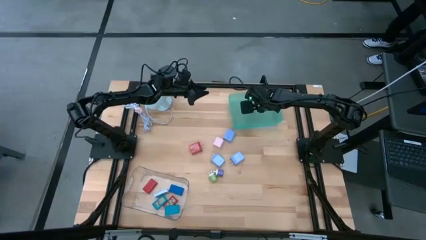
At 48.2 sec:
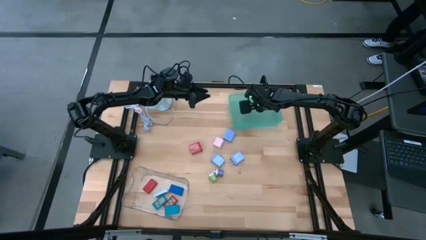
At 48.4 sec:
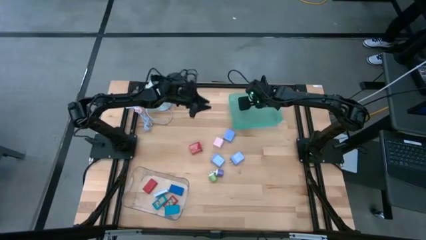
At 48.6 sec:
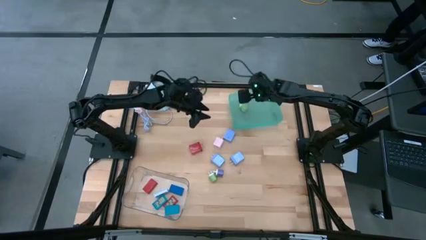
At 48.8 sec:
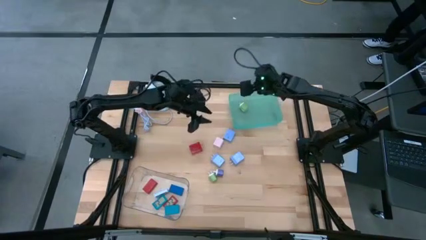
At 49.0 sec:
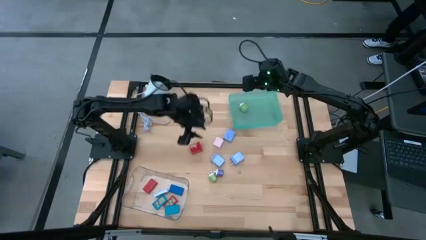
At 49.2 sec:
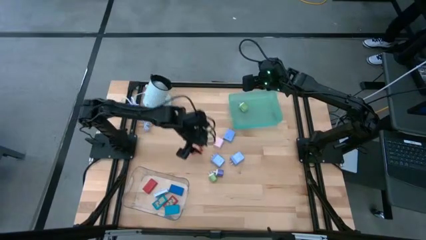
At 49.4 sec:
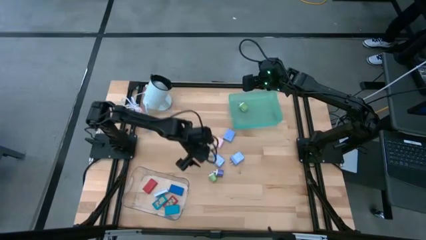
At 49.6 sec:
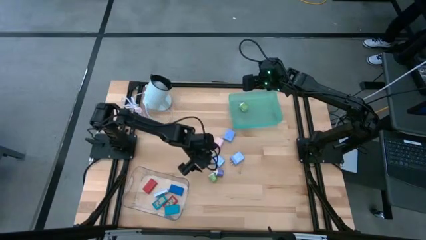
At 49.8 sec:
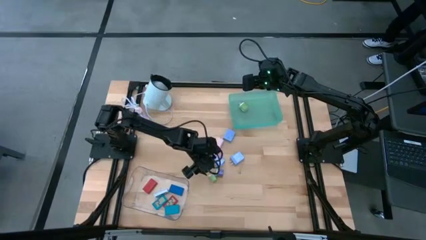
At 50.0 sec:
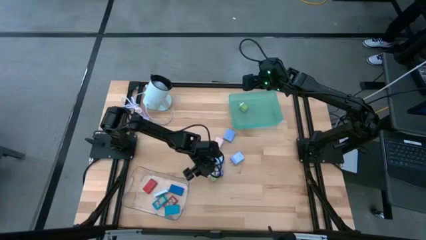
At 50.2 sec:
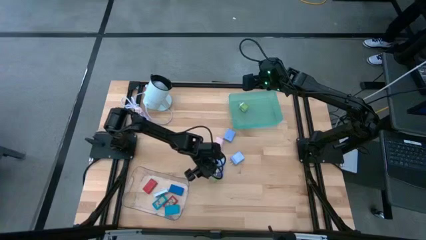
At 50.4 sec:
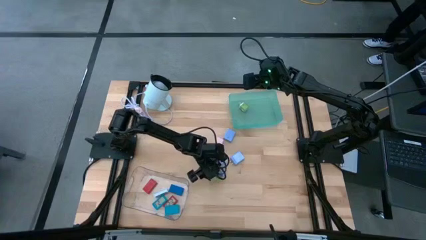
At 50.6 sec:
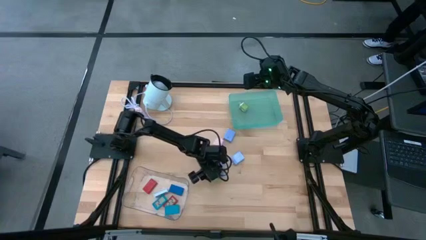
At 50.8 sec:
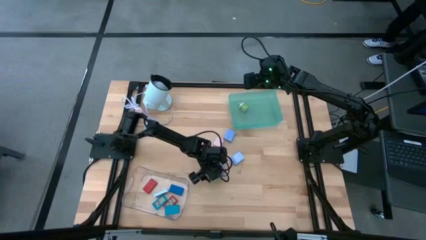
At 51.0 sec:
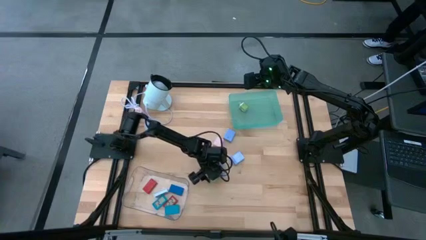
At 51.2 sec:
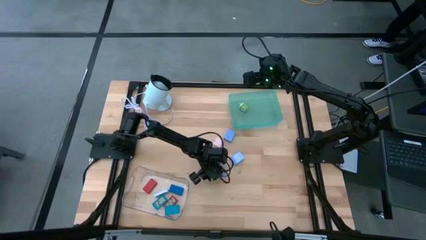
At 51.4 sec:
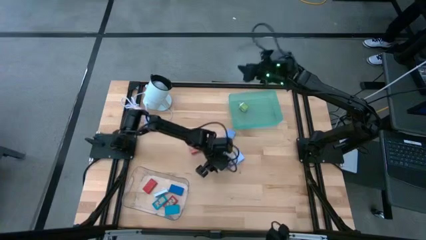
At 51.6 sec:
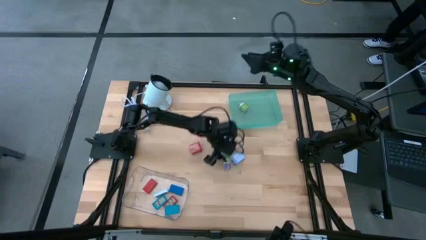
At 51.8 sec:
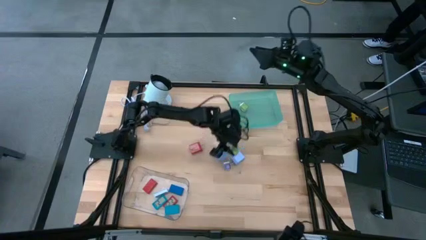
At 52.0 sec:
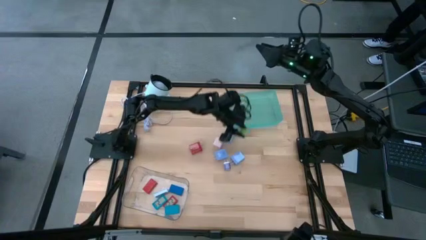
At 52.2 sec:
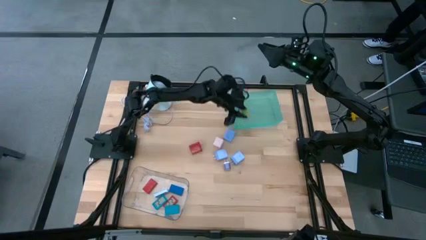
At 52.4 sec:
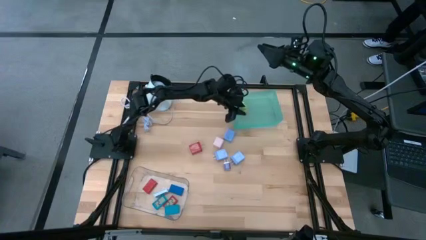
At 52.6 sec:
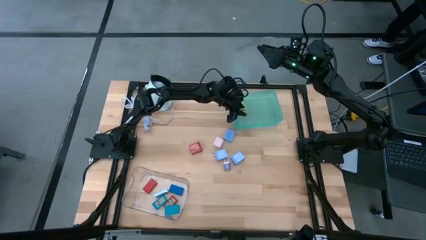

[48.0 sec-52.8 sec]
Task: Pick & Place Office items
Put the green charger adapter into the light green bin

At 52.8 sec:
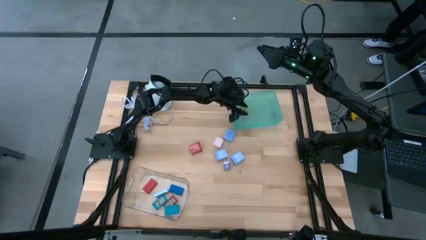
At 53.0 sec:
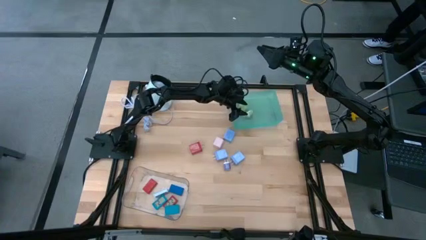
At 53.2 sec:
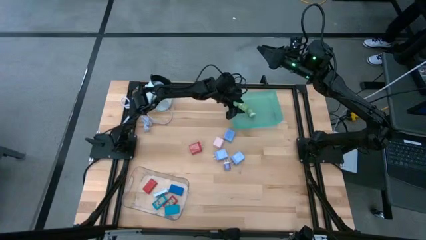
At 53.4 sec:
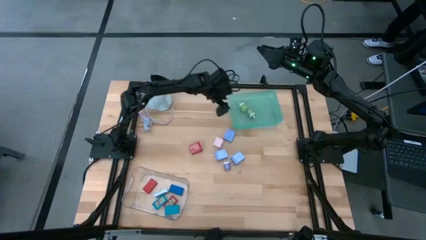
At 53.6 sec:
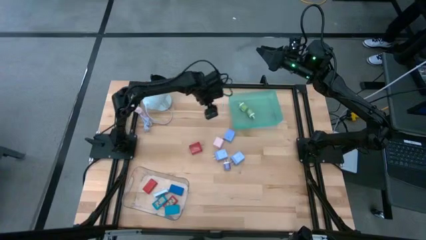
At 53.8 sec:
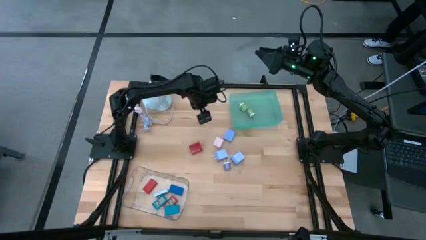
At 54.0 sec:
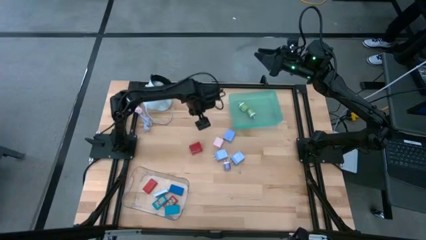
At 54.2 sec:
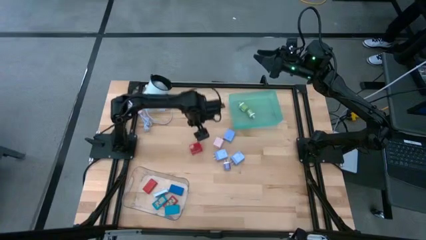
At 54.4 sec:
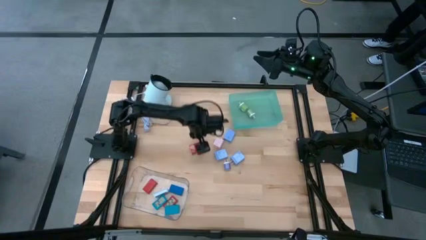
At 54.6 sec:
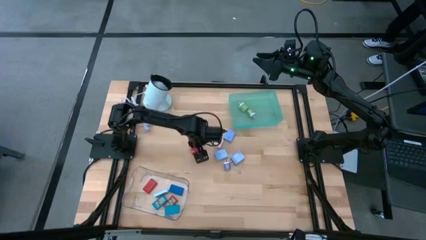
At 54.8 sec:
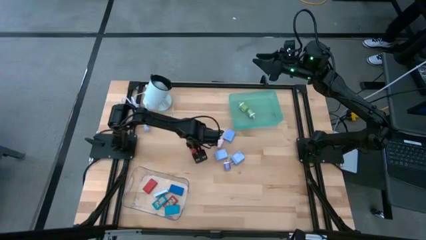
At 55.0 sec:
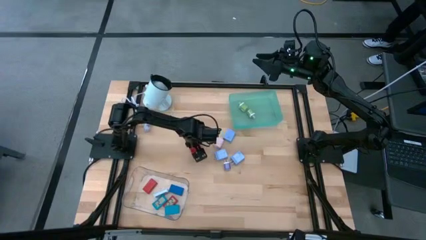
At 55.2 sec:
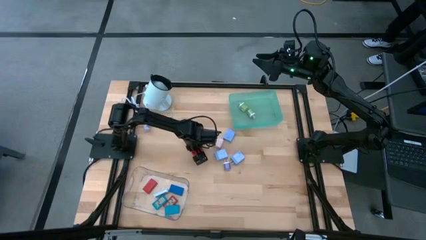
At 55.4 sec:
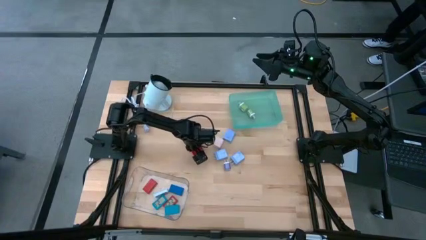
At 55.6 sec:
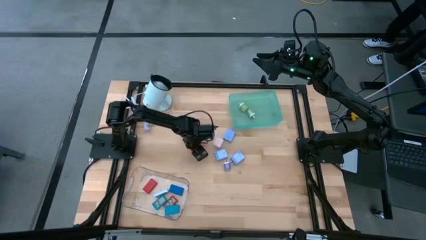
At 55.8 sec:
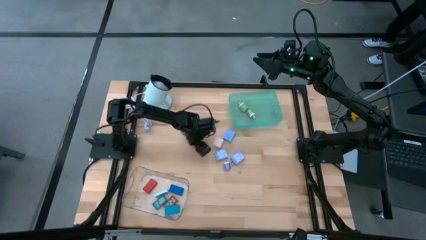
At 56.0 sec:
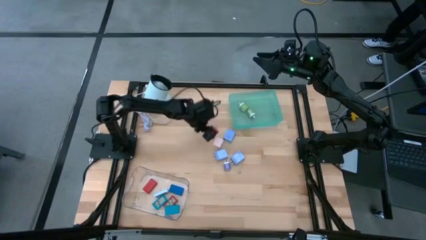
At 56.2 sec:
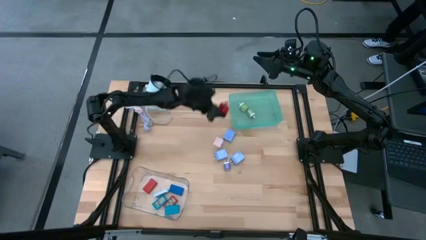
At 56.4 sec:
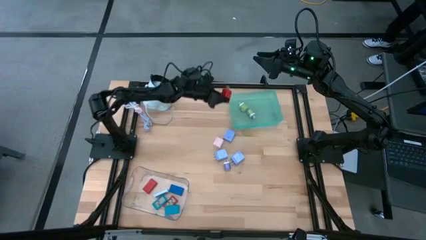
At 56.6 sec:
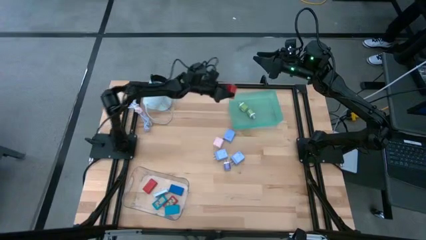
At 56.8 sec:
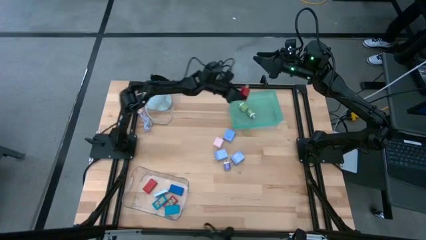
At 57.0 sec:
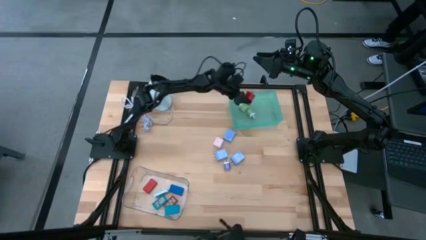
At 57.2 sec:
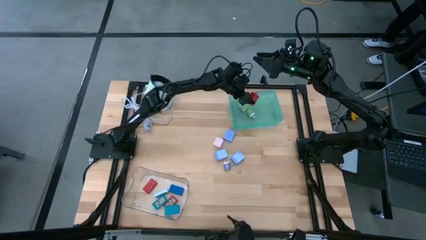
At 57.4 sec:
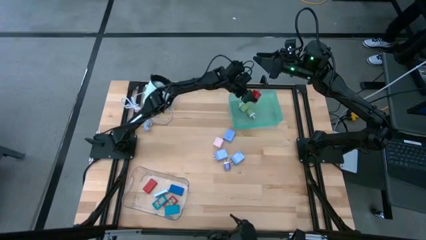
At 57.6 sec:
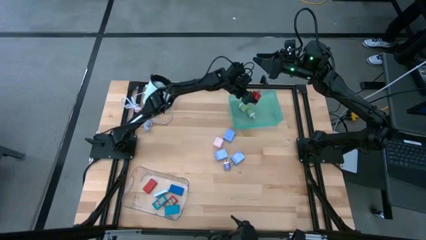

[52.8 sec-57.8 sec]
Put the red charger adapter into the light green bin

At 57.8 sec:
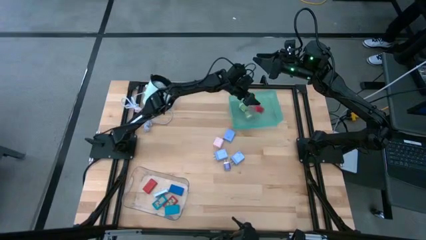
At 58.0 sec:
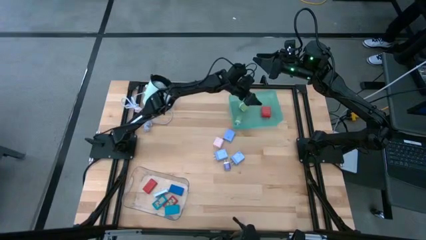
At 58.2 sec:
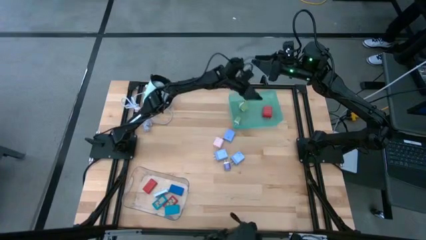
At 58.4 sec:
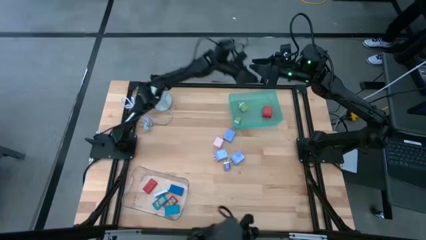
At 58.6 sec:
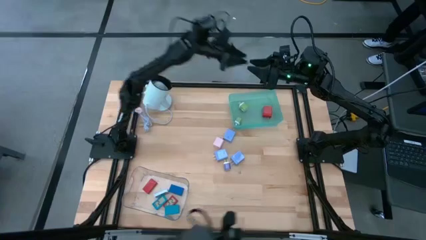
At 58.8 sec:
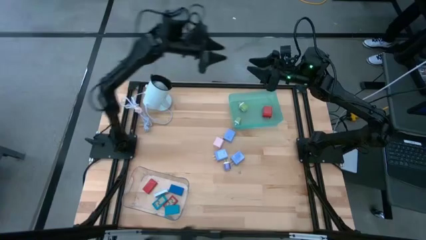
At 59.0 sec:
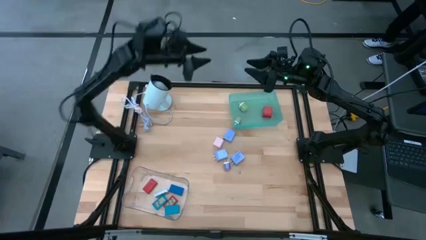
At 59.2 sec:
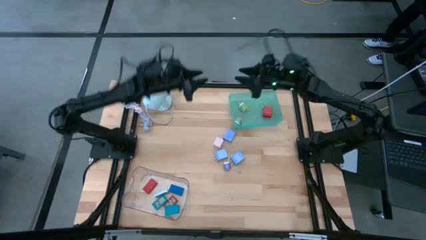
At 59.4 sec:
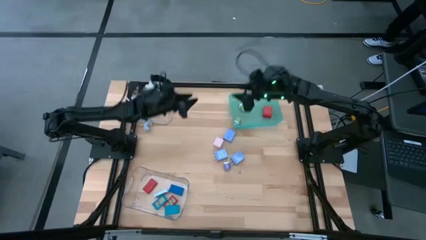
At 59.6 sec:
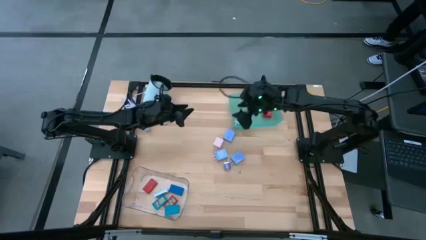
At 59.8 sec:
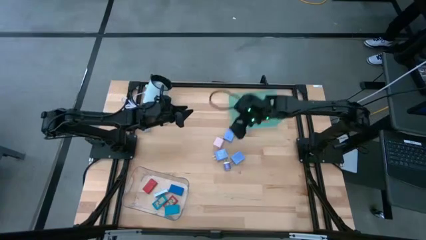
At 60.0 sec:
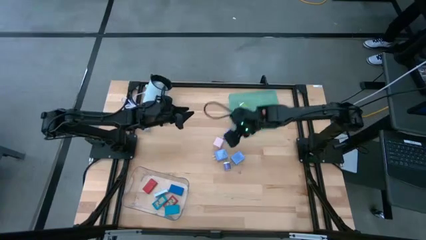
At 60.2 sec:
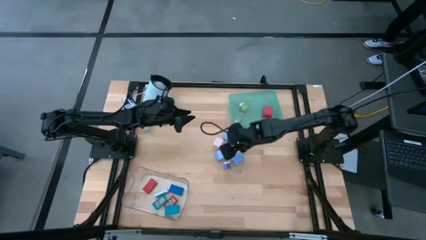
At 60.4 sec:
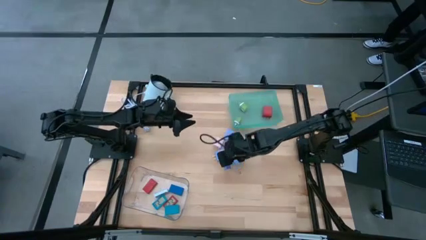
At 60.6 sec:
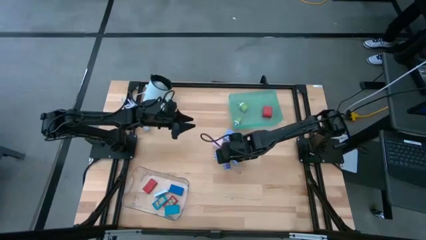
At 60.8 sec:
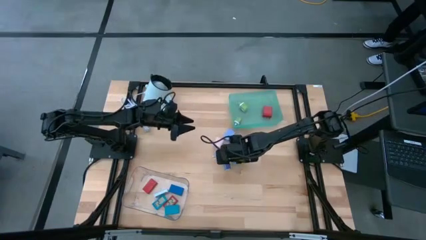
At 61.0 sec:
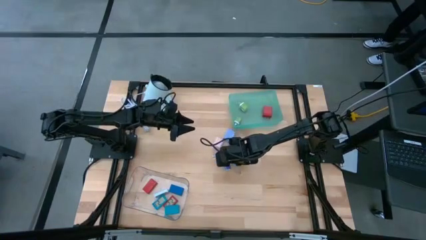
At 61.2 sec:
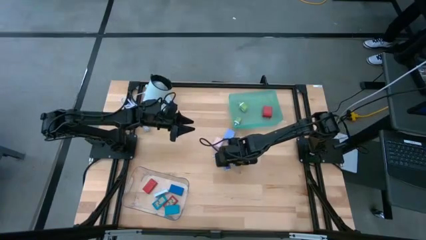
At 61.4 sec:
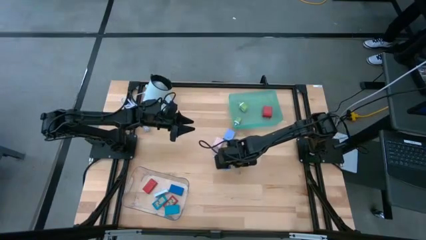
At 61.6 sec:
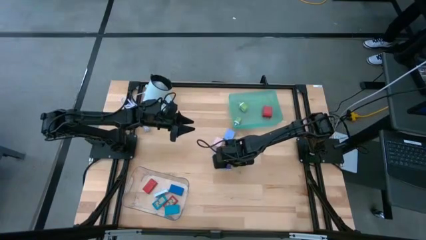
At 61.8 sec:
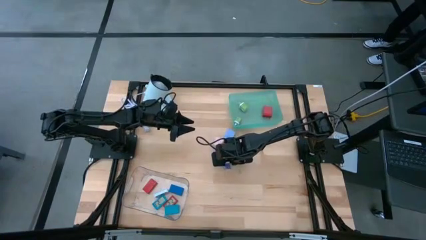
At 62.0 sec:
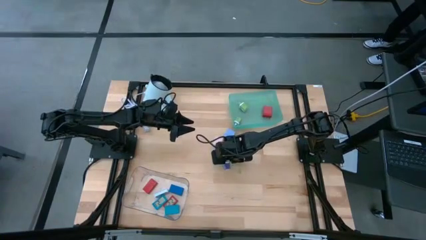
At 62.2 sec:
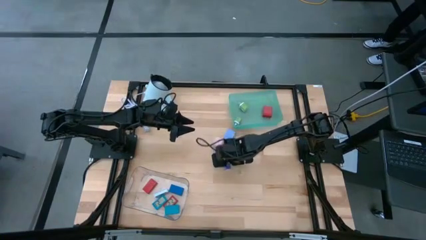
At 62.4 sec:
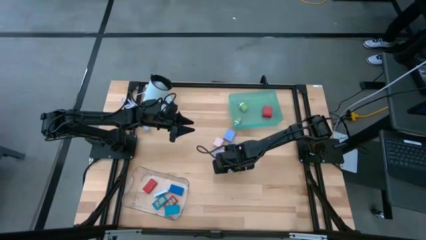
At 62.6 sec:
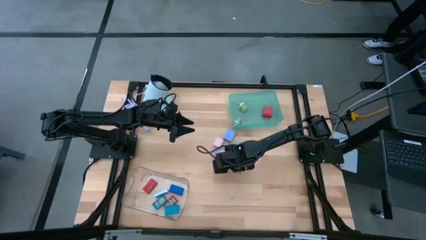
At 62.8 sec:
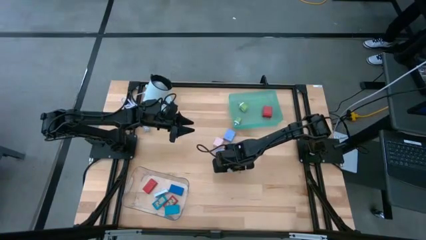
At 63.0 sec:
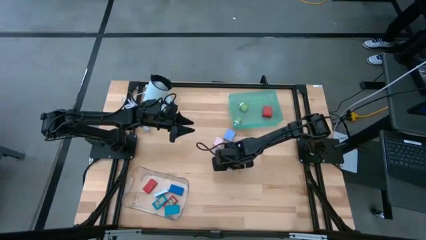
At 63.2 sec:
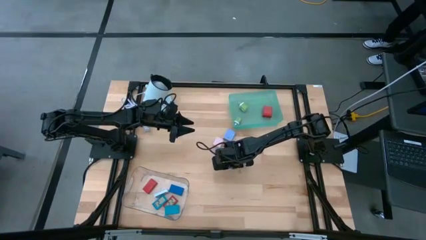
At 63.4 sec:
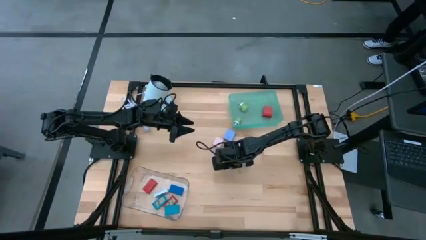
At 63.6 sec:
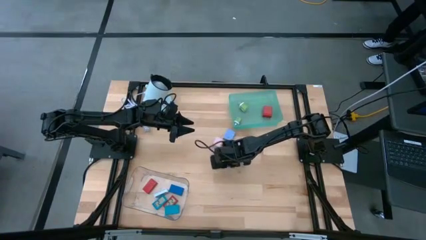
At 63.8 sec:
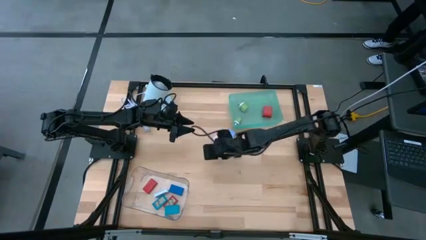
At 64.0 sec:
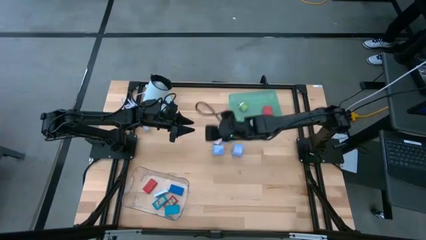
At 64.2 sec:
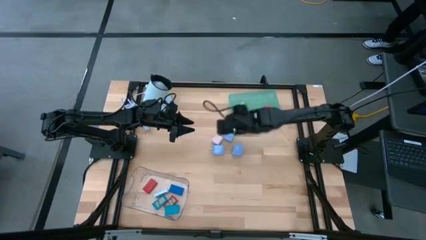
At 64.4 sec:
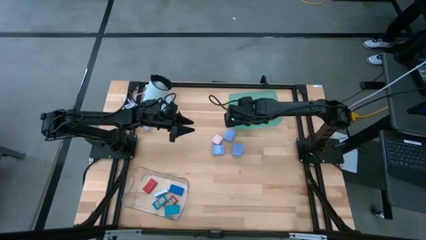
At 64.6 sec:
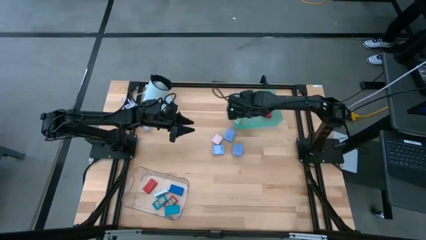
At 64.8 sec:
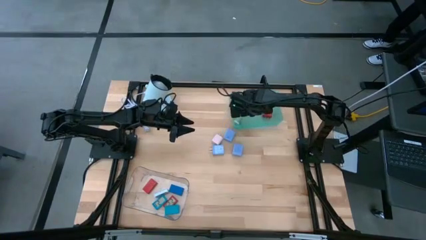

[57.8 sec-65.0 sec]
Put the purple charger adapter into the light green bin
